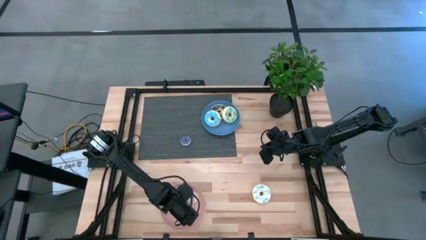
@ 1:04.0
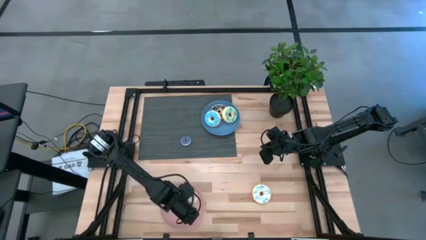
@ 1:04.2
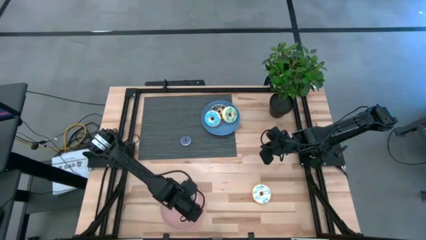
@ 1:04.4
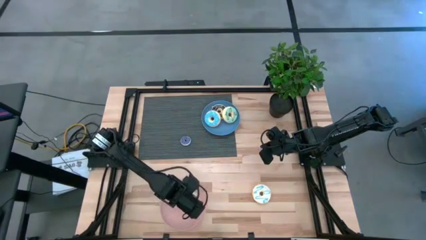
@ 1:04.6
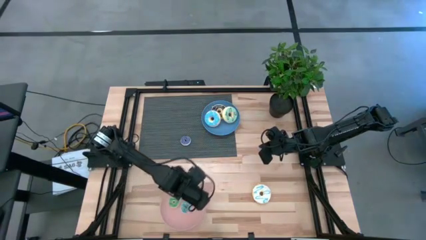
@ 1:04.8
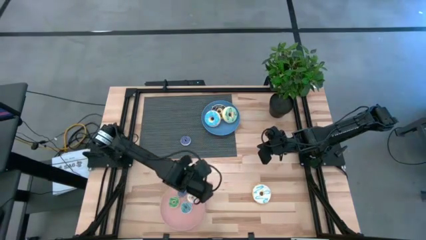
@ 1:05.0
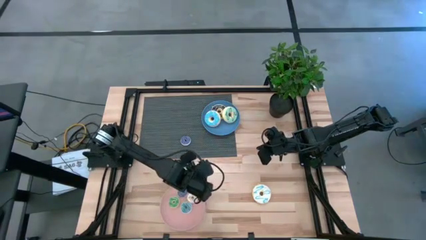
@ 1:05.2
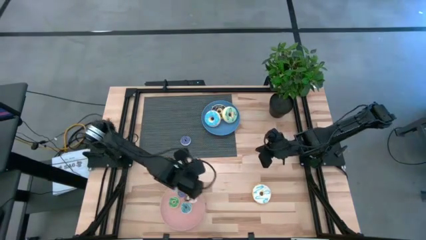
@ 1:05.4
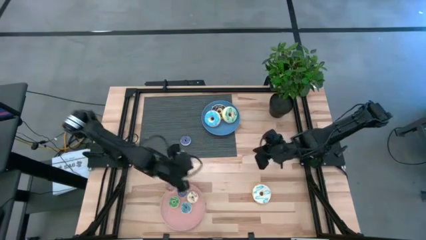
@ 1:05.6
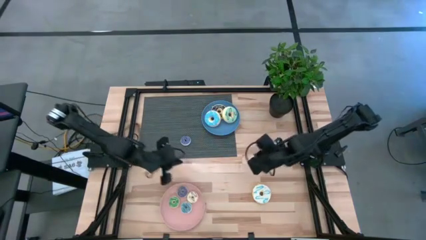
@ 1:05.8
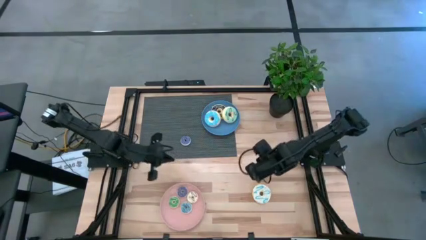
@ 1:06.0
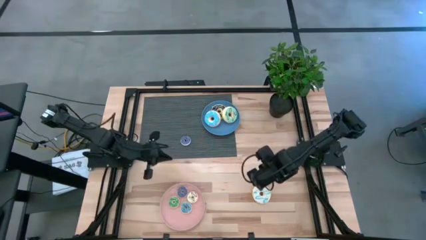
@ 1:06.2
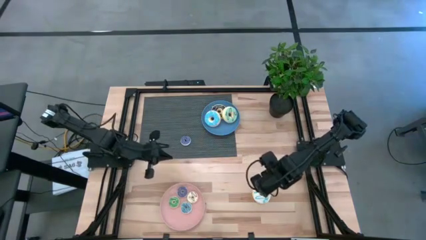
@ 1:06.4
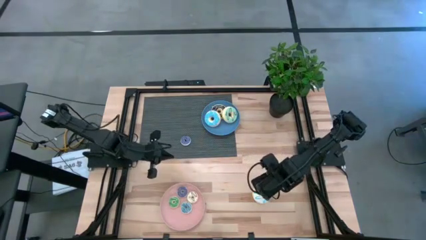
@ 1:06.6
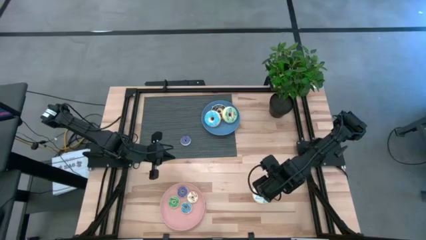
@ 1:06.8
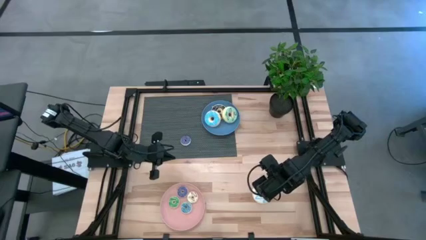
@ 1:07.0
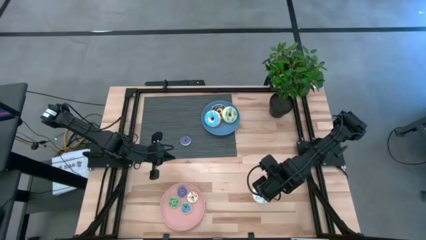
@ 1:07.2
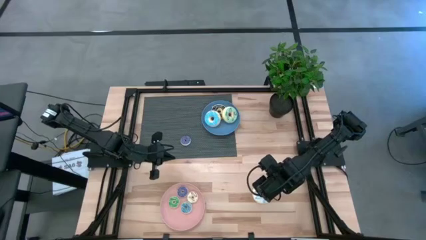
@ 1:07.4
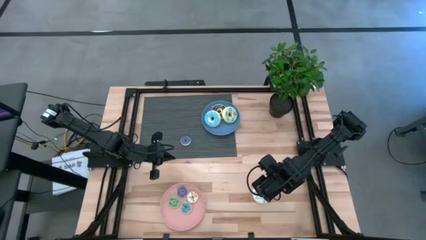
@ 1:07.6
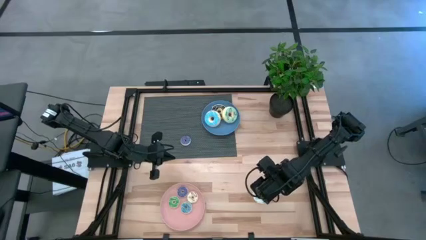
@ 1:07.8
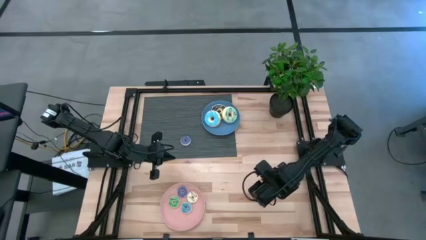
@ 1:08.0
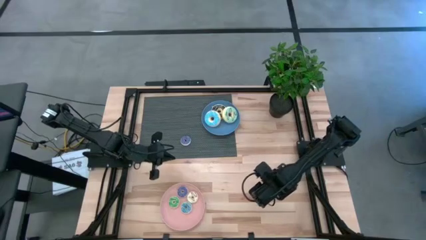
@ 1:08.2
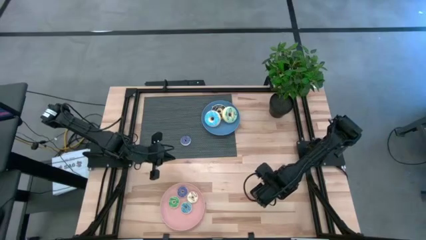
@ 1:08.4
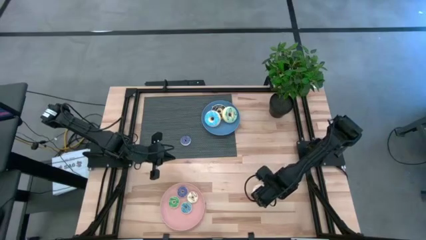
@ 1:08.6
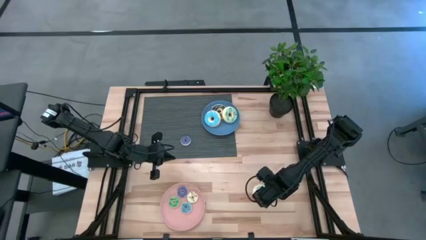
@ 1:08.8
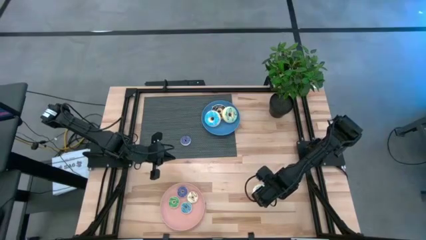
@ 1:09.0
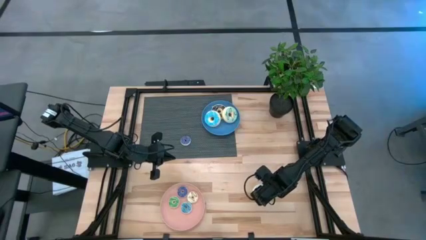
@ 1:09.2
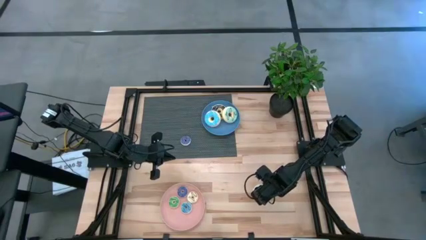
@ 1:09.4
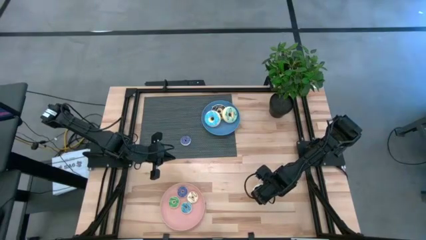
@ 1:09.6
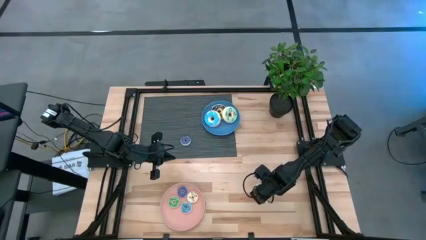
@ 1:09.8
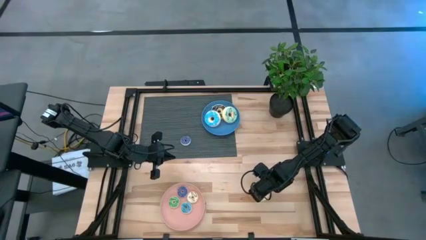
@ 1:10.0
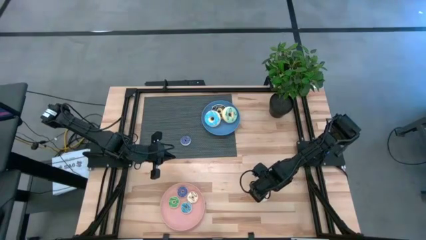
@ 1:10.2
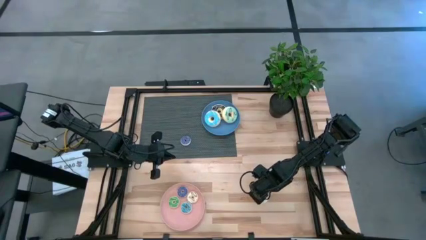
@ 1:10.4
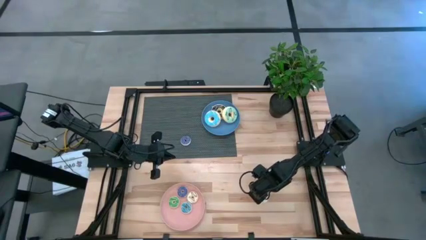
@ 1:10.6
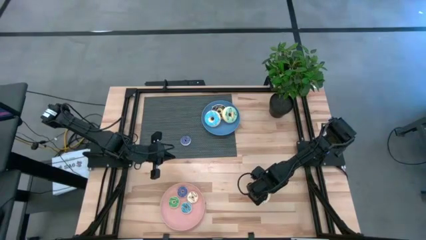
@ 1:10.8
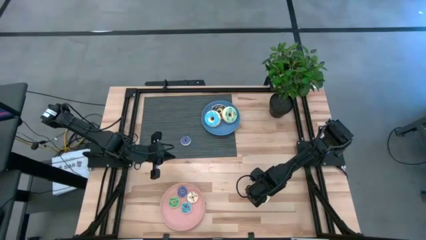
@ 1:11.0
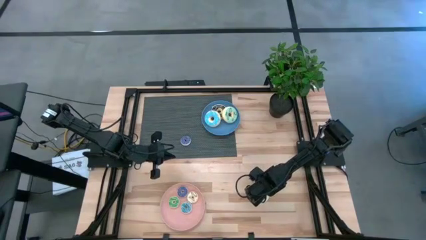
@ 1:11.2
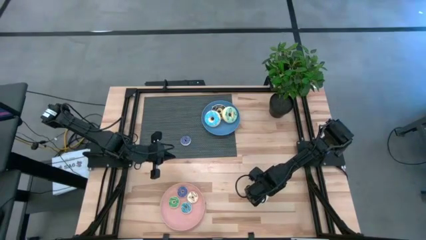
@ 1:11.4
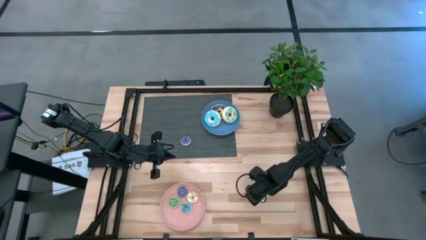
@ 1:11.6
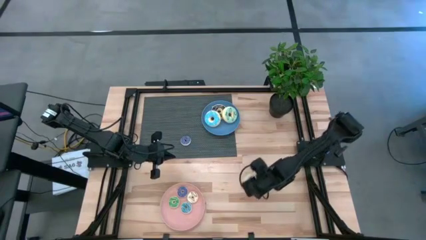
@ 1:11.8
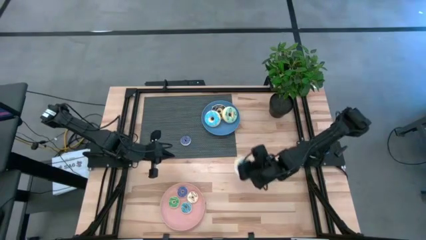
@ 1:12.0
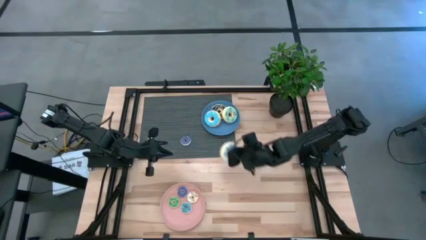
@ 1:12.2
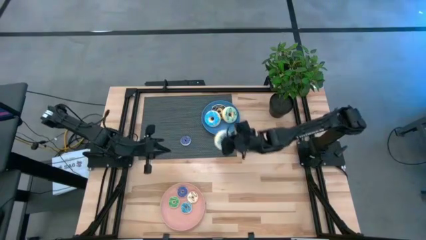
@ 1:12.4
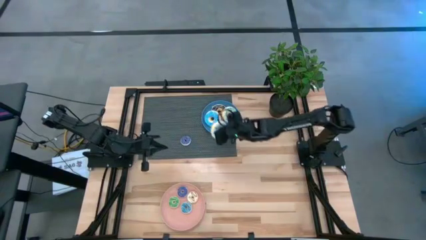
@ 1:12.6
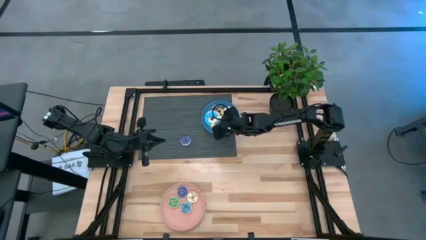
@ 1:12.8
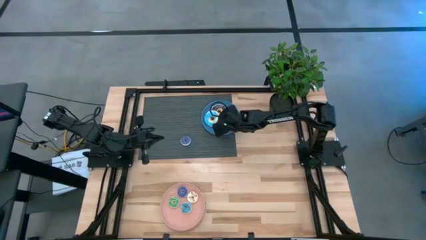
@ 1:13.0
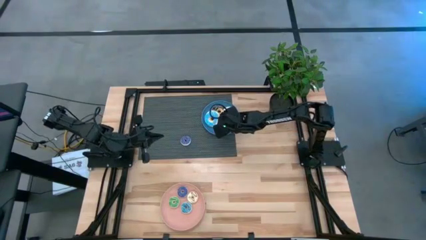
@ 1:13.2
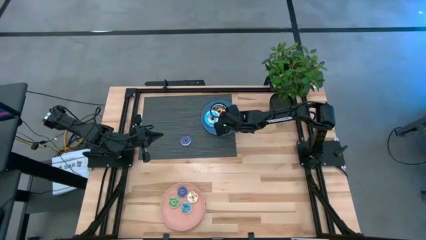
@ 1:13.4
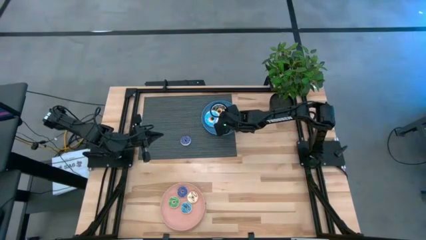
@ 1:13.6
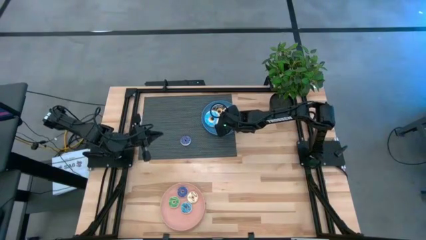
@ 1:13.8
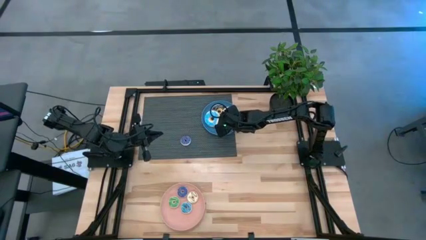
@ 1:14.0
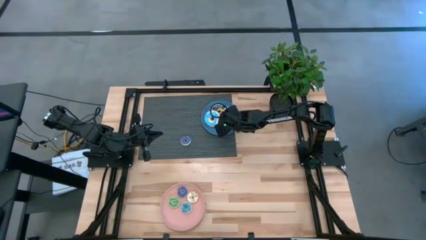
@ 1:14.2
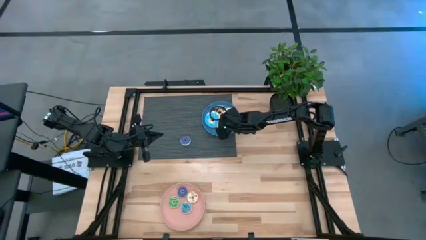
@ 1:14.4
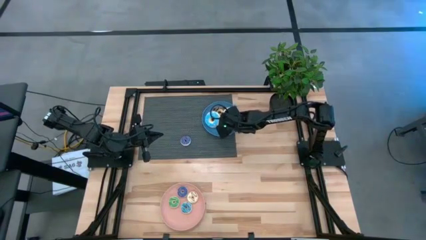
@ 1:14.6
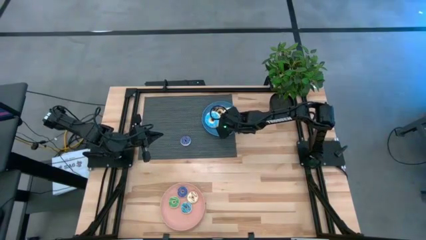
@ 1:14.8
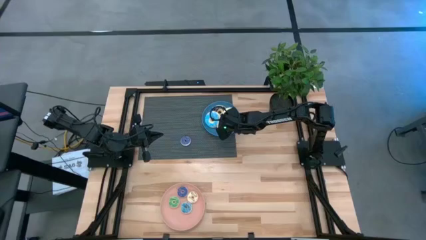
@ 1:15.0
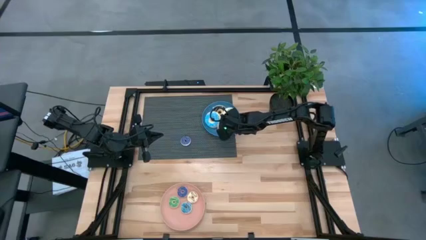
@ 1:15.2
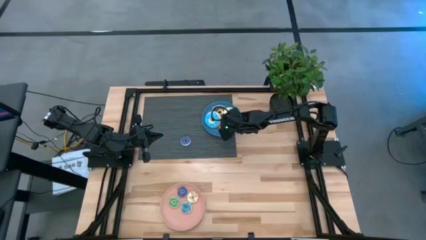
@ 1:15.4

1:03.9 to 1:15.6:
Task: Pick & Place donuts
Put the large white donut on the blue plate

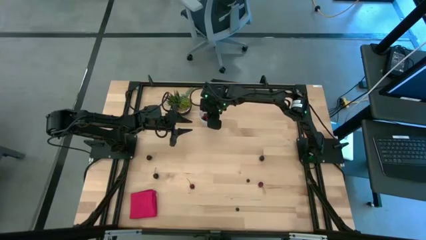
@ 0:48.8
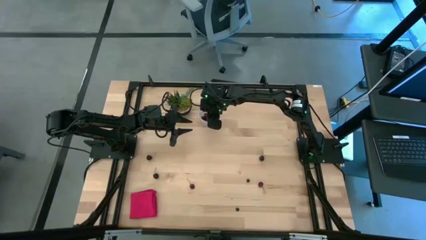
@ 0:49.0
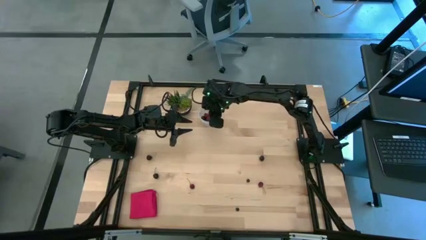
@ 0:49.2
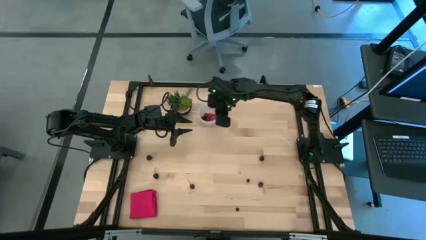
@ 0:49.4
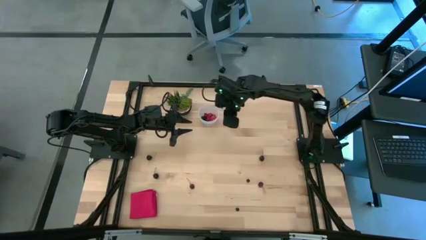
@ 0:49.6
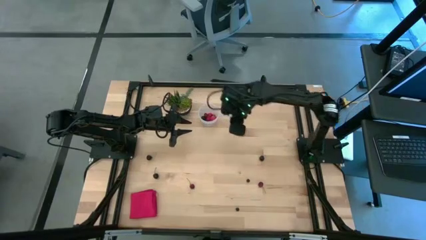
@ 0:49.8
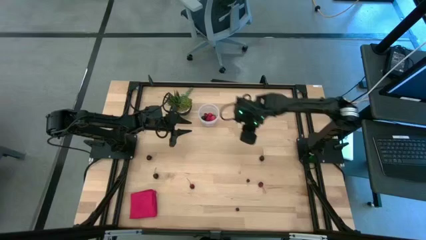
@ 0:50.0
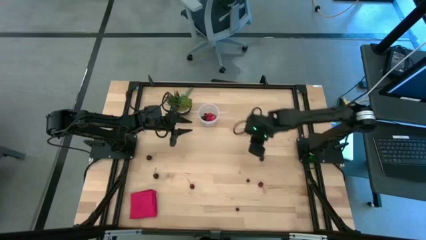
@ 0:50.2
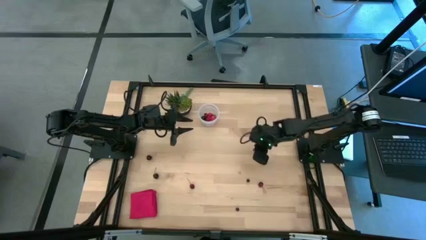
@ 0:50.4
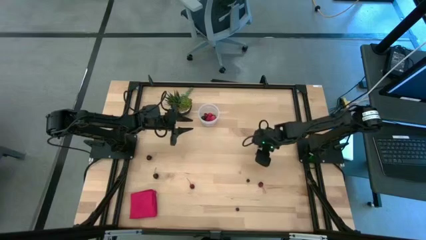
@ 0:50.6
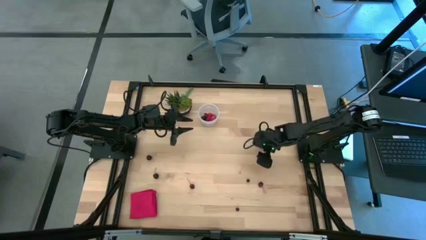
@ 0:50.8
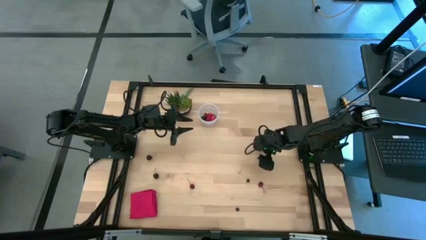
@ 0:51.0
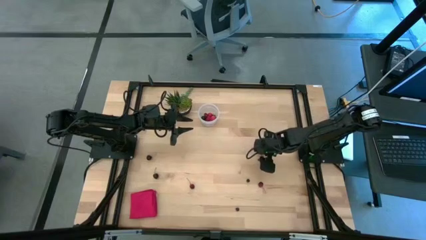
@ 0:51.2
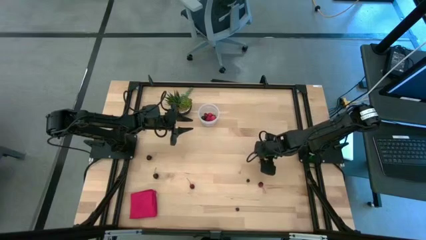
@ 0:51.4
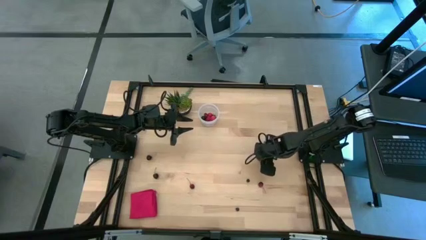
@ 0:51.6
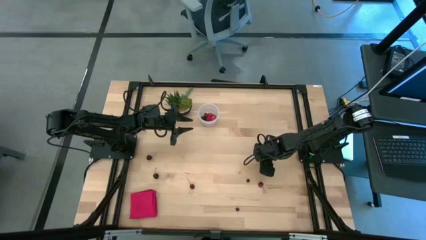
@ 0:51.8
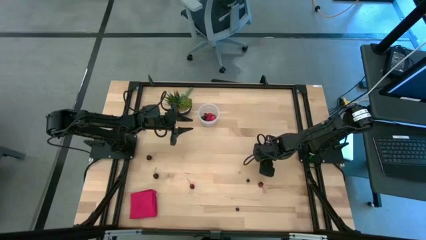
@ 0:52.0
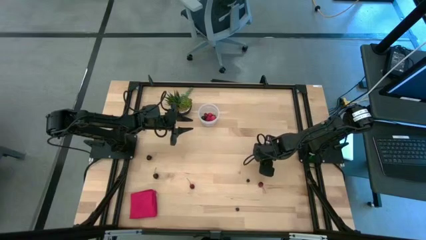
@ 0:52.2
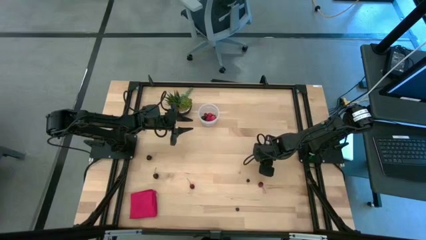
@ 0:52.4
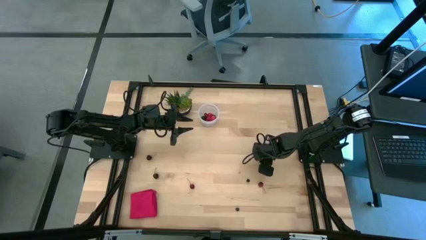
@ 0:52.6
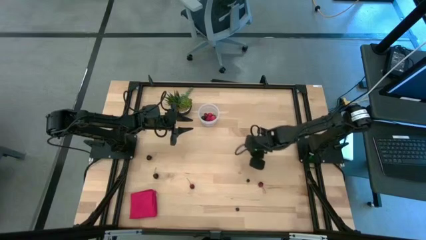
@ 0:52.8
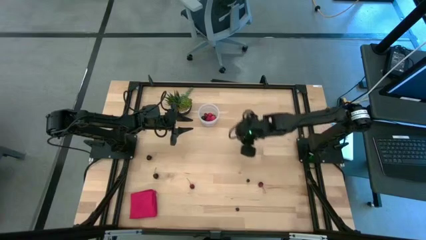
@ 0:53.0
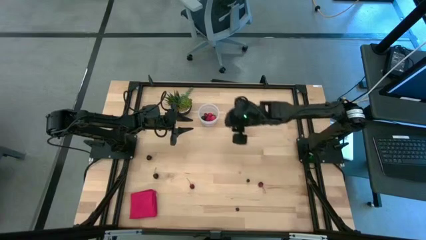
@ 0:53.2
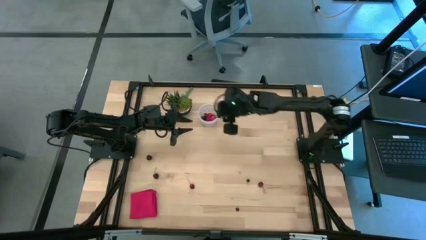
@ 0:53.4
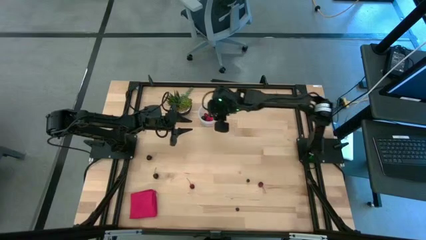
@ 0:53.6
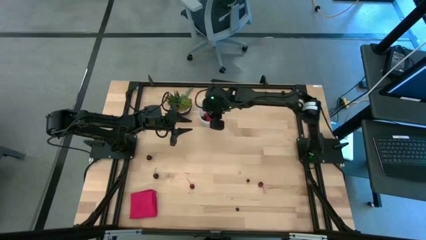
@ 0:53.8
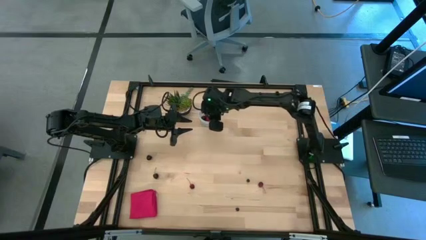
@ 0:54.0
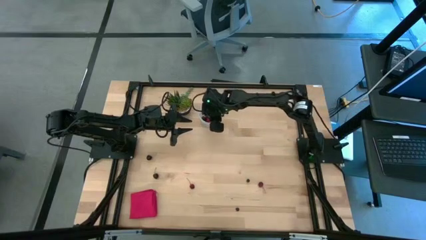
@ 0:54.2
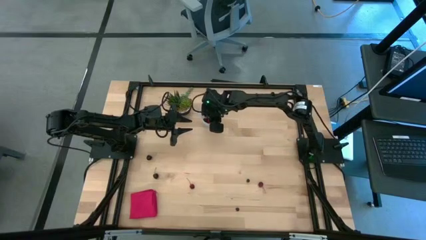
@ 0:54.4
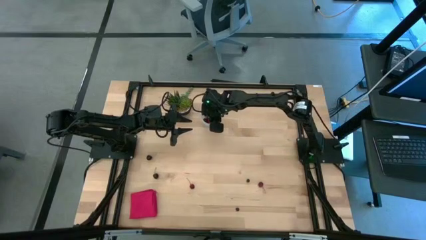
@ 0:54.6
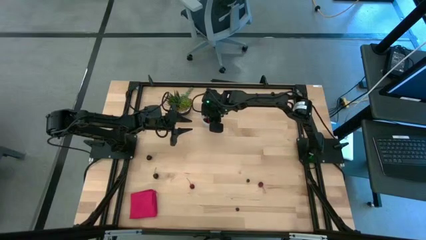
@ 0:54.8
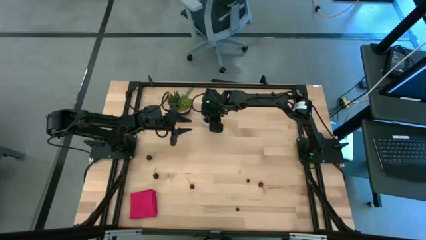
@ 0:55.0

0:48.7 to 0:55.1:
Task: Pick and placing Produce into tupperware
Put the blackberry into the transparent container
